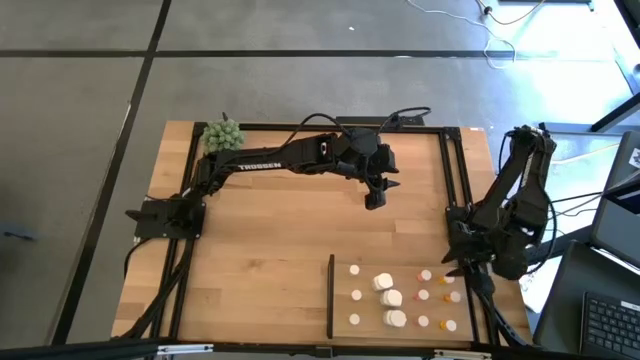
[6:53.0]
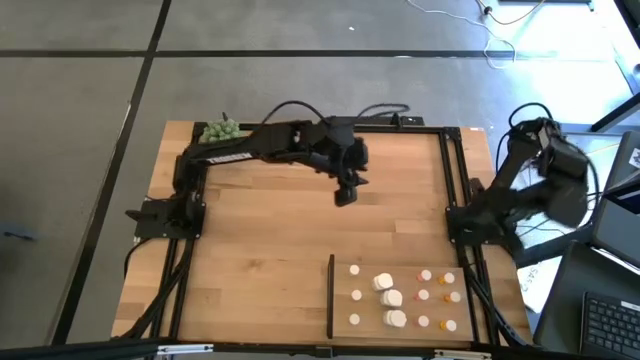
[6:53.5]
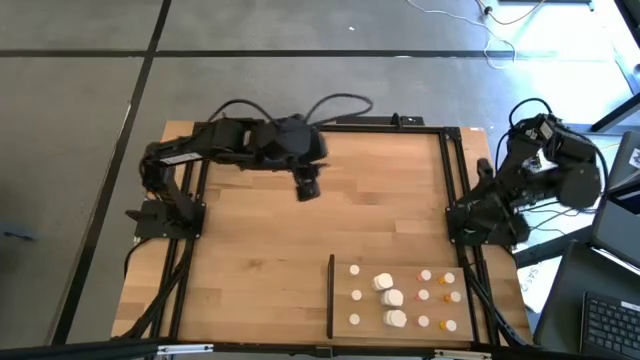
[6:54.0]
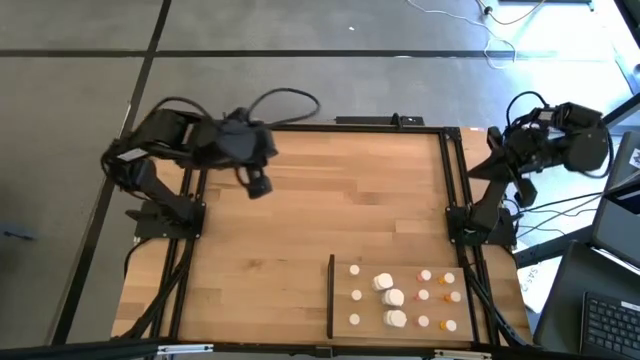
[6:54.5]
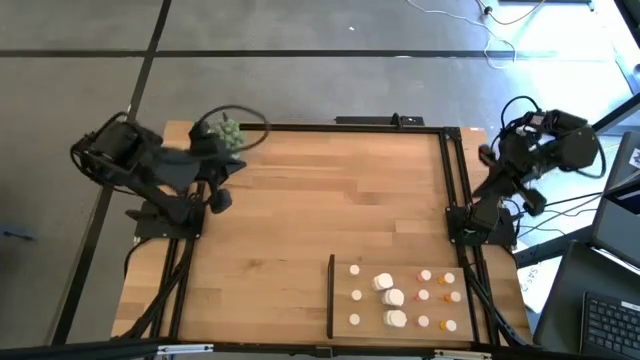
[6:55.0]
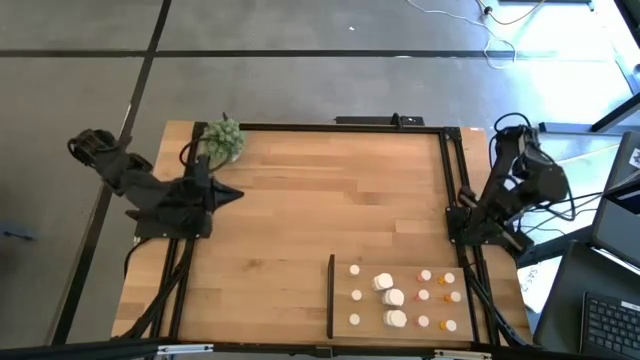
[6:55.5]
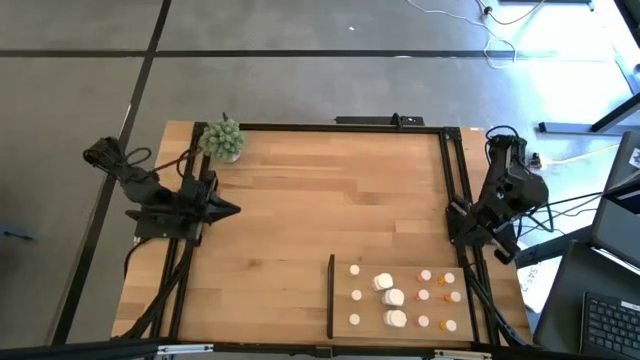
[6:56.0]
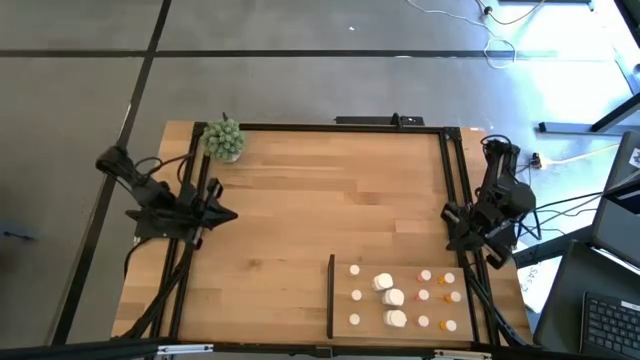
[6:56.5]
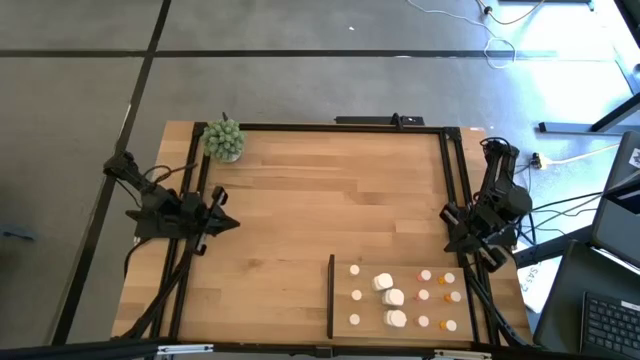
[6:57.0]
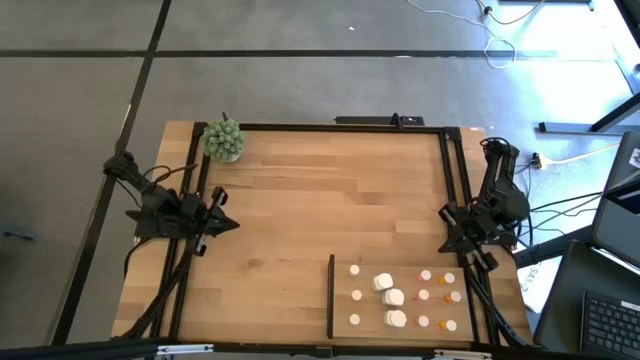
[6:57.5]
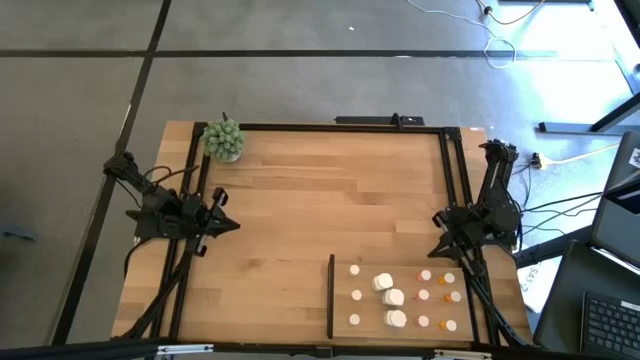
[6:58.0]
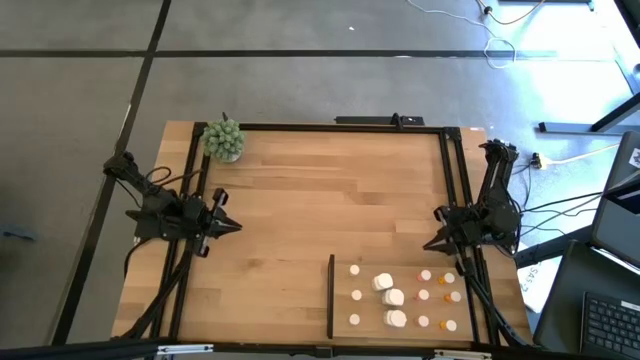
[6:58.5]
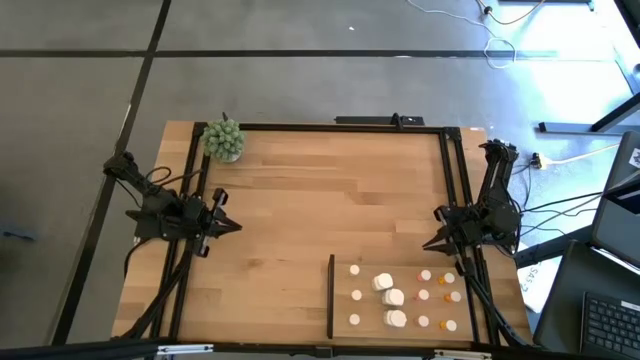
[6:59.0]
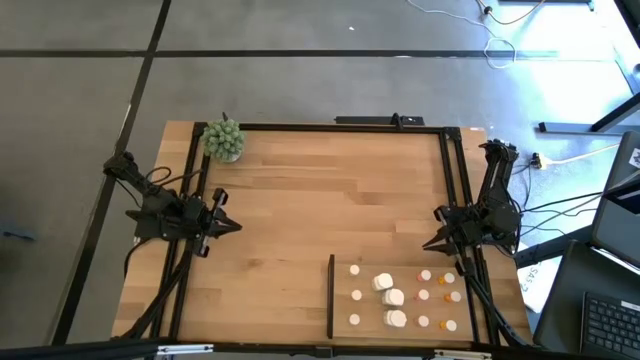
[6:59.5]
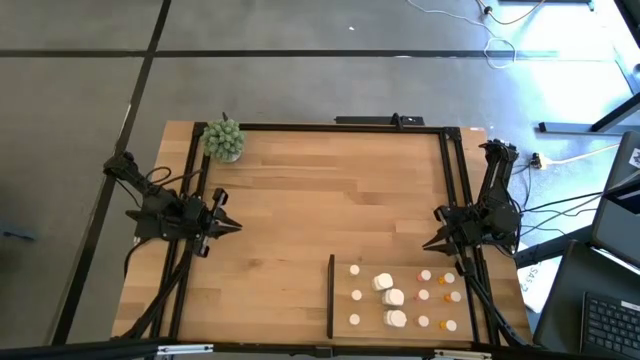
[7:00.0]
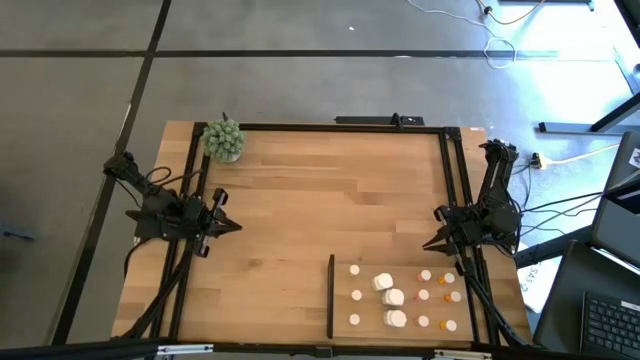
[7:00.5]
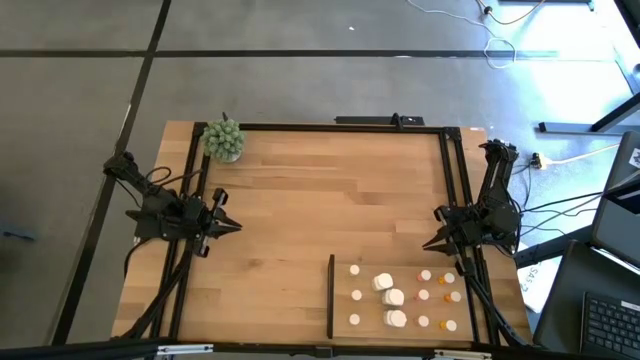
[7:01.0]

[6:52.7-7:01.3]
Task: Pick and place medicine bottles onto shelf by color
Return to Home Position

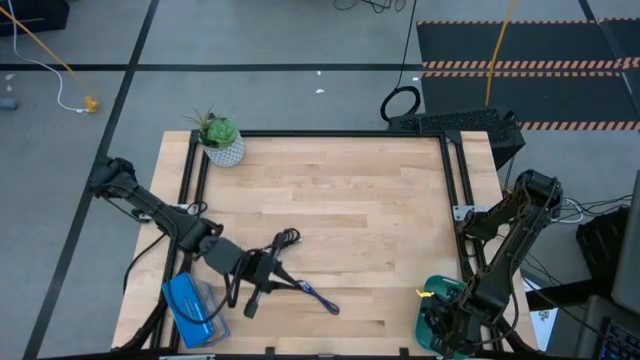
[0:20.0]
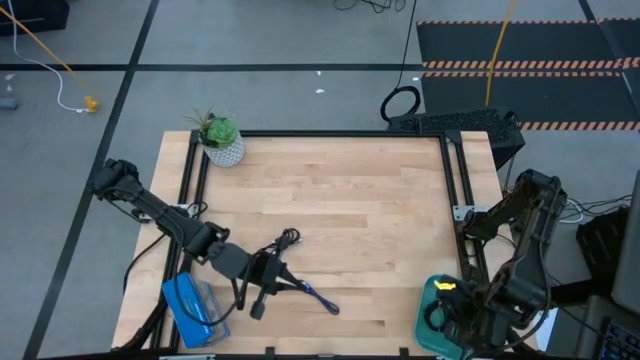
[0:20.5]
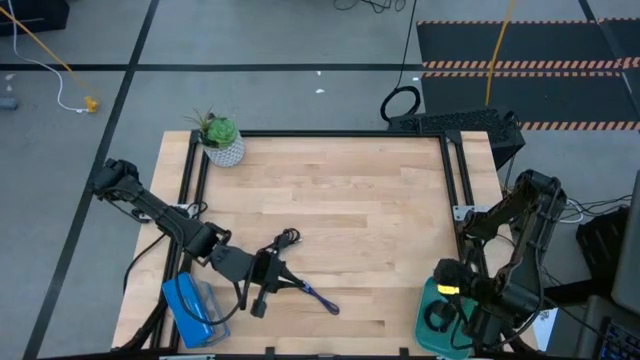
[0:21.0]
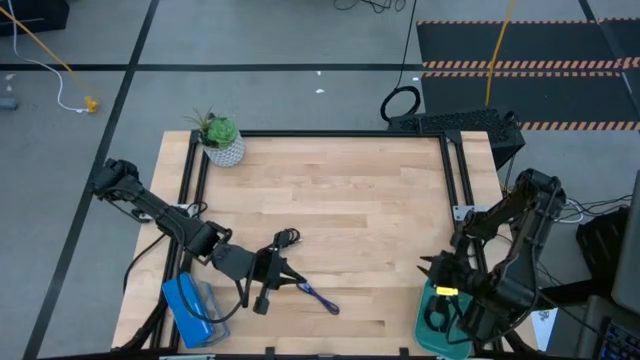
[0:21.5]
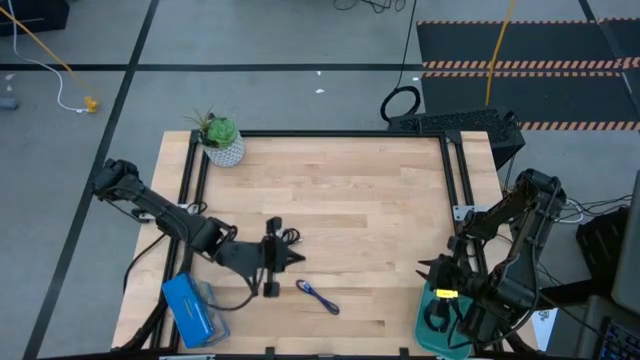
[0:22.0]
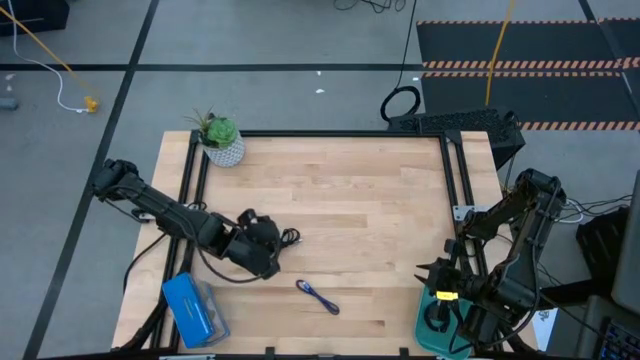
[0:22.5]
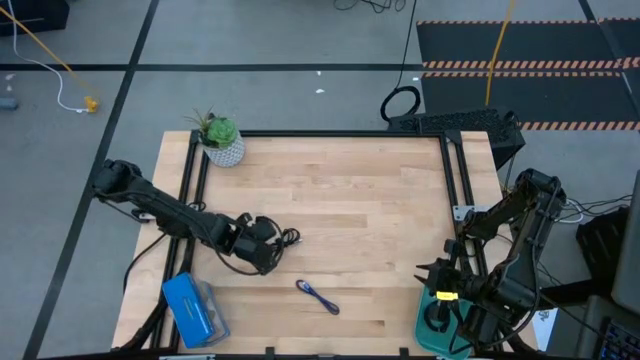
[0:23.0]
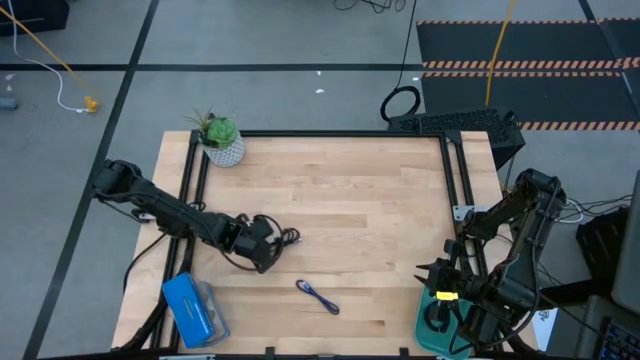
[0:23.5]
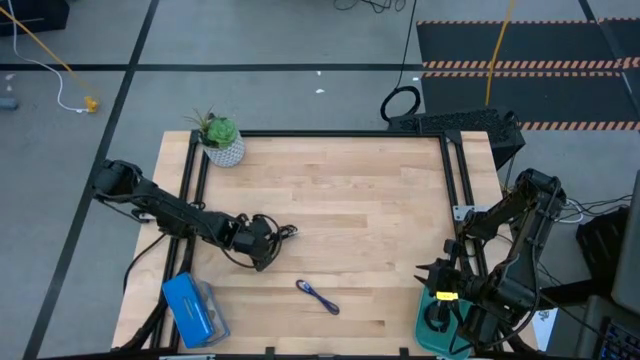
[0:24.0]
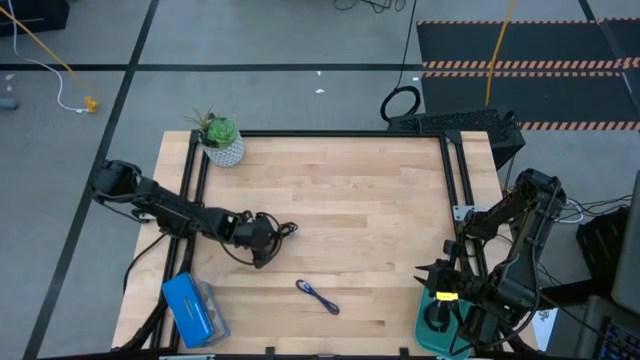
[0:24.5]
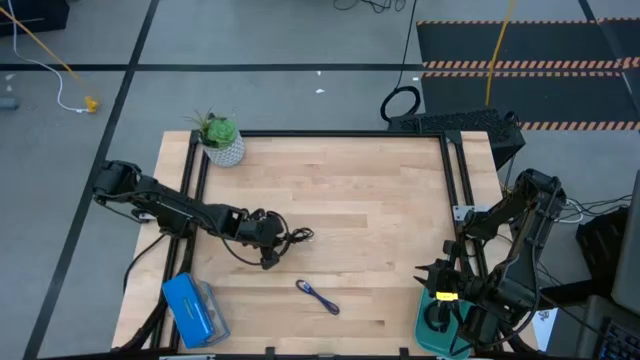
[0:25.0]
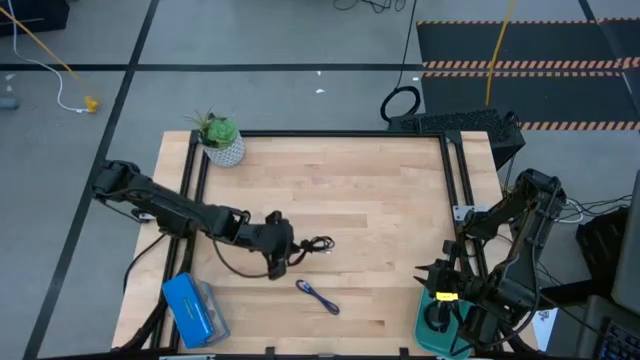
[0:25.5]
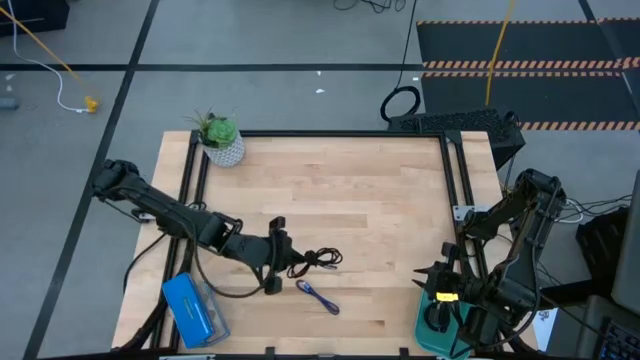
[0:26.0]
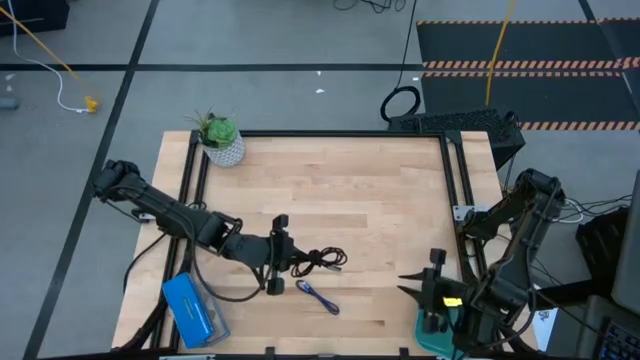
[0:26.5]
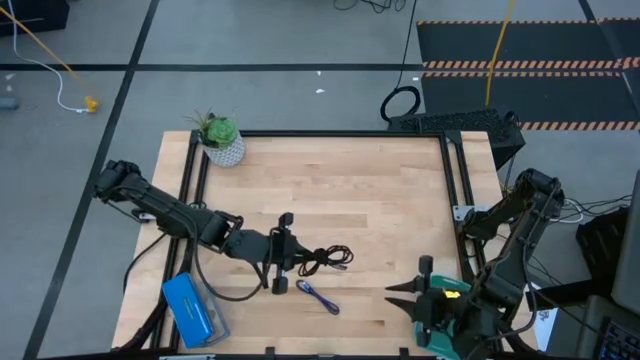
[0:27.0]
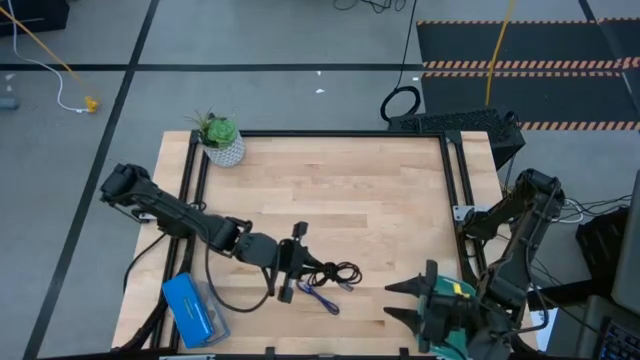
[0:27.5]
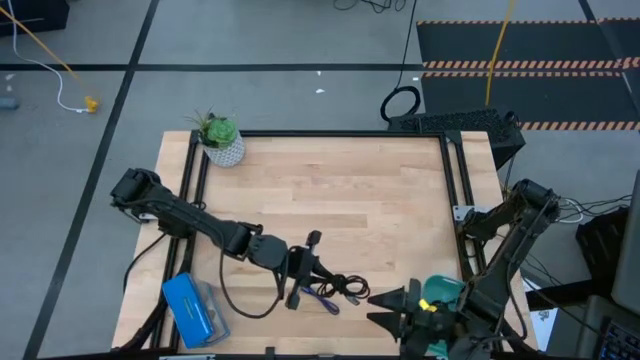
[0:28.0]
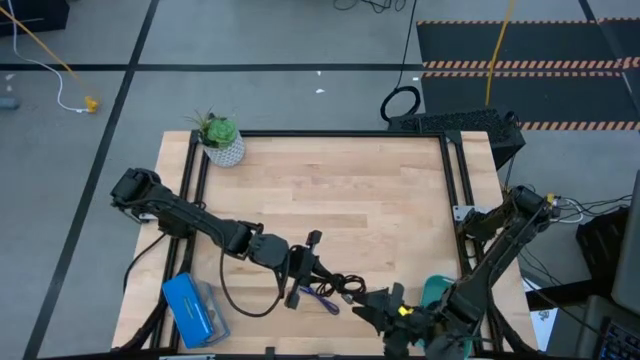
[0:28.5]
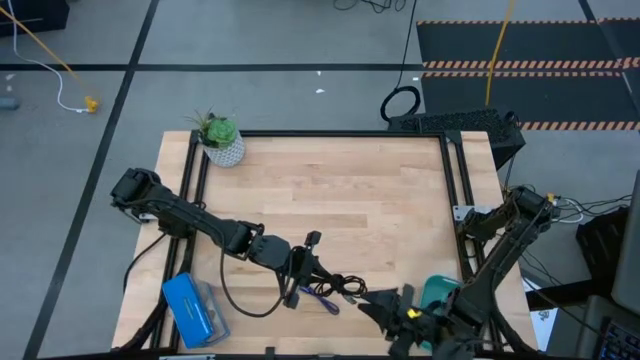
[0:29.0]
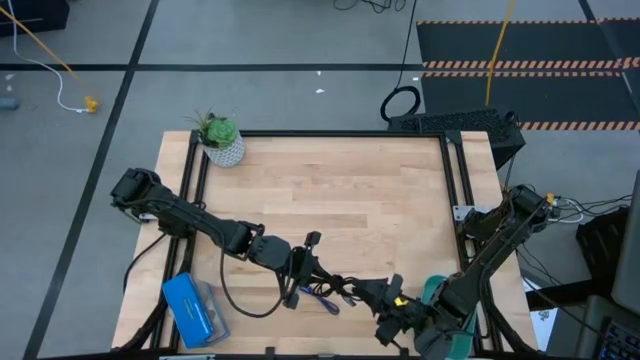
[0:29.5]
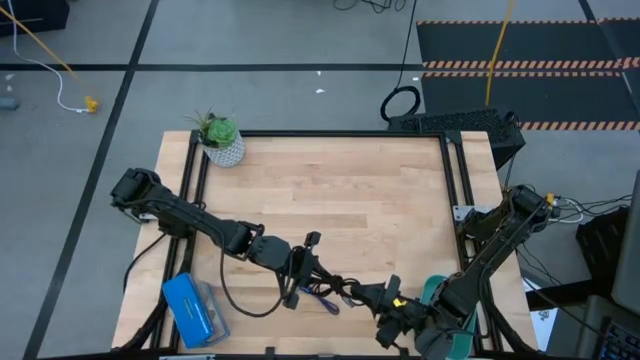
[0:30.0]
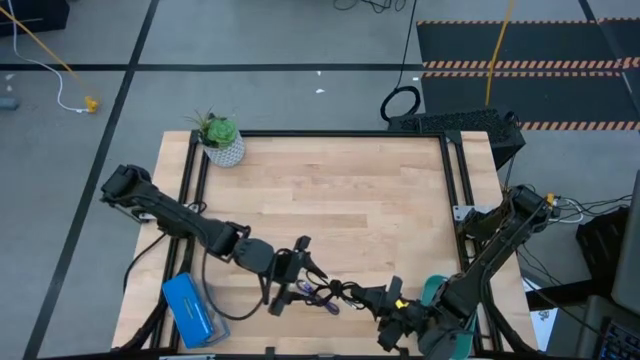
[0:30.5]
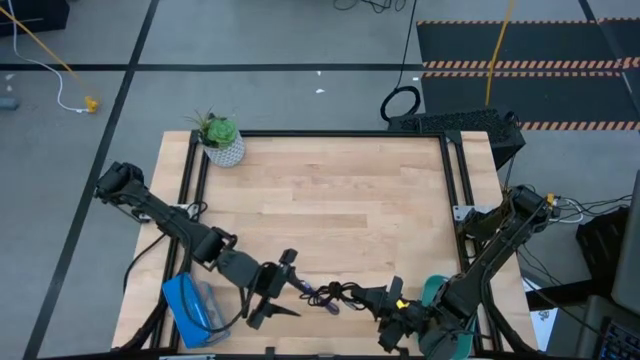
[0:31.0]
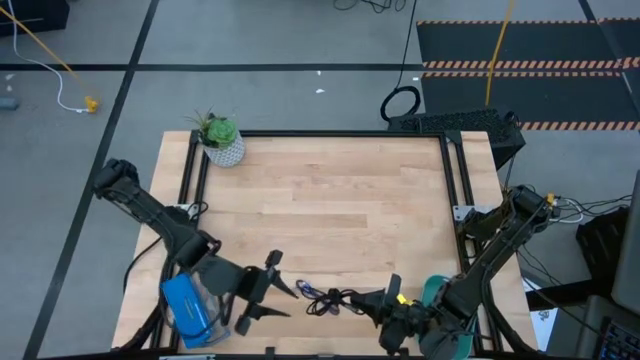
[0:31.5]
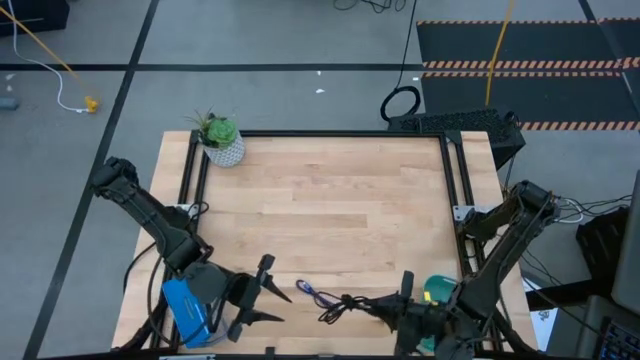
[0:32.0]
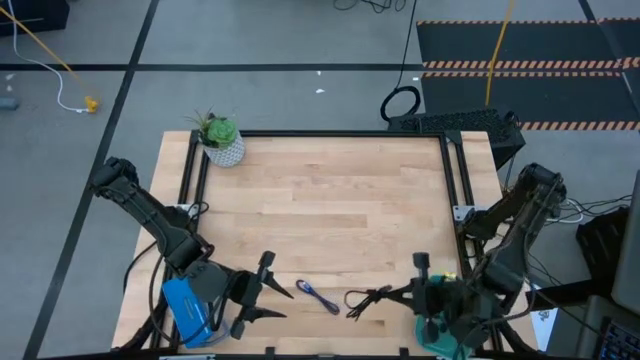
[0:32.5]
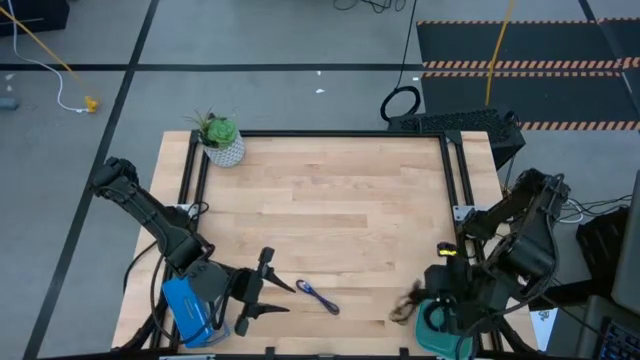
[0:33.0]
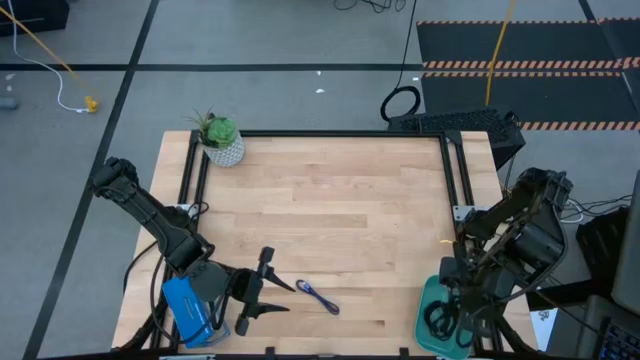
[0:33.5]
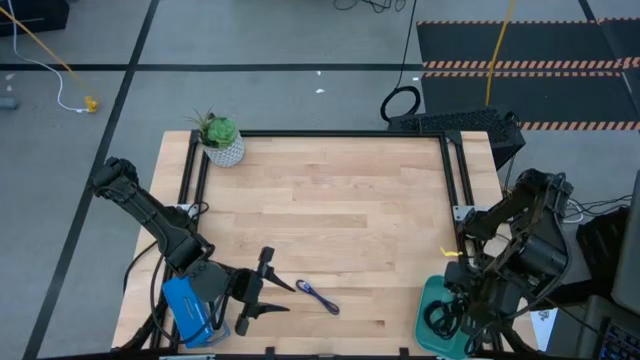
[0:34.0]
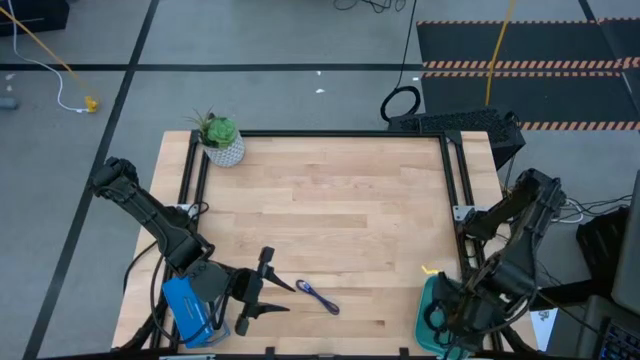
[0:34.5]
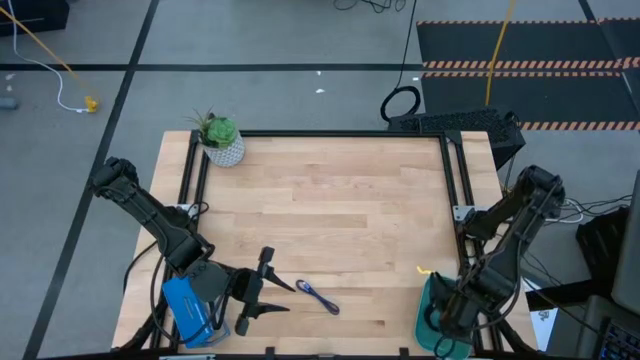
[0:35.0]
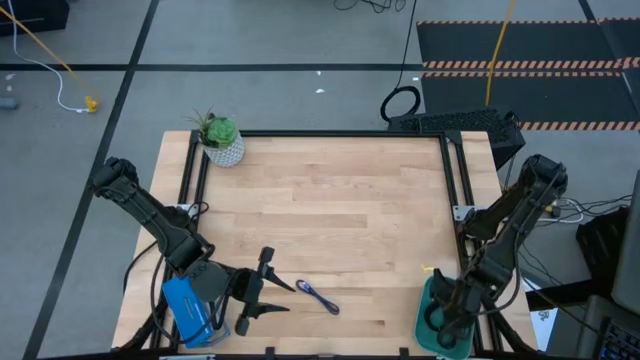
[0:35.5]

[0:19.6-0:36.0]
Task: Pick and place USB-C Cables
Put the black USB cable into the green bin
